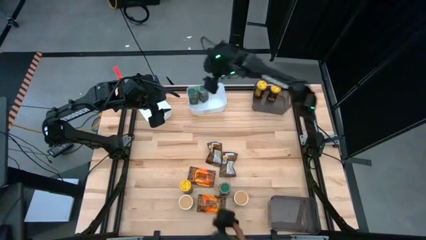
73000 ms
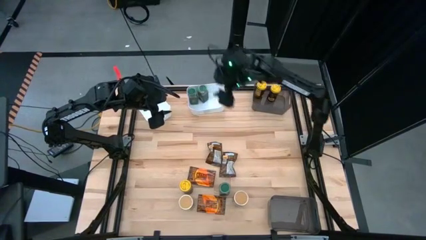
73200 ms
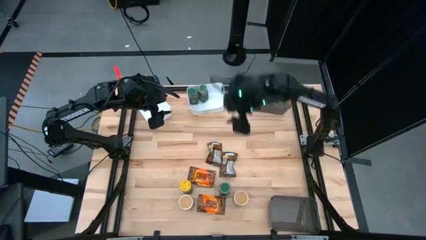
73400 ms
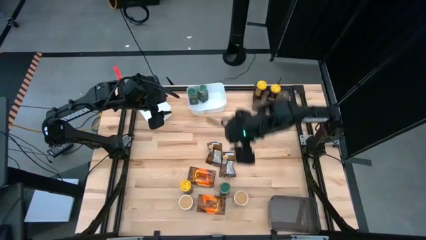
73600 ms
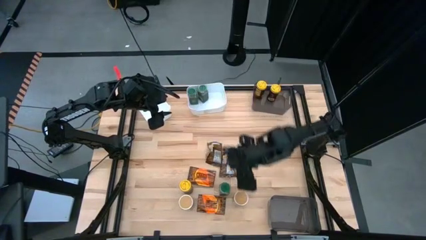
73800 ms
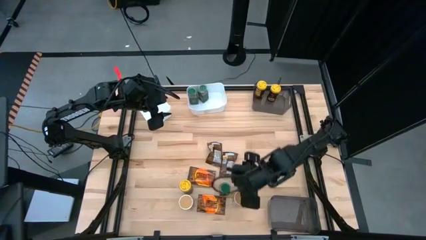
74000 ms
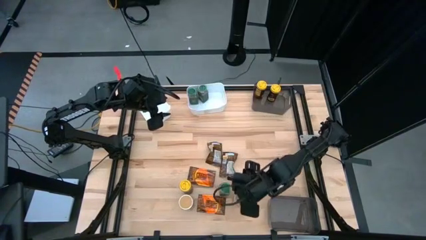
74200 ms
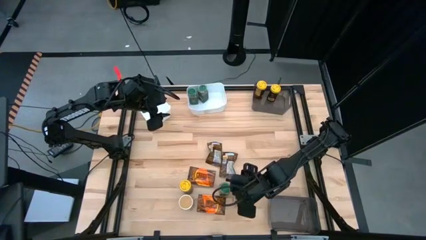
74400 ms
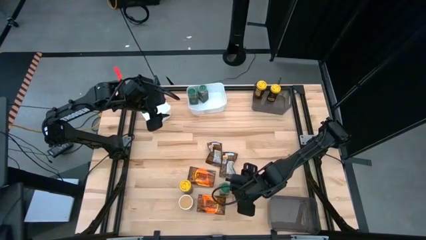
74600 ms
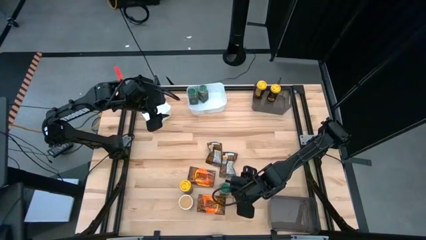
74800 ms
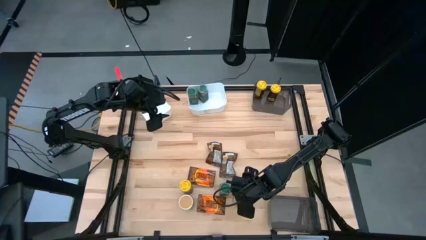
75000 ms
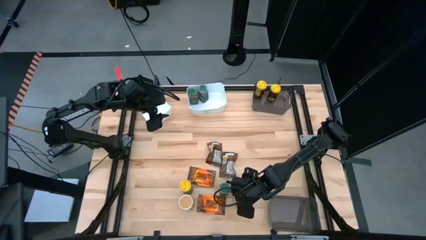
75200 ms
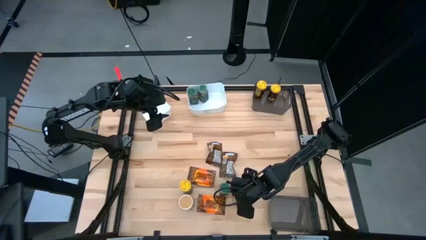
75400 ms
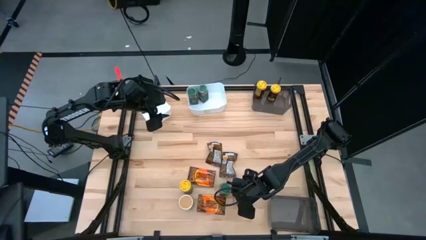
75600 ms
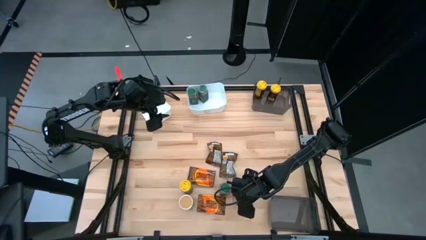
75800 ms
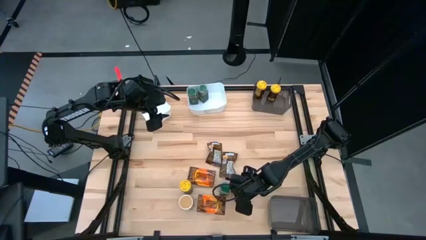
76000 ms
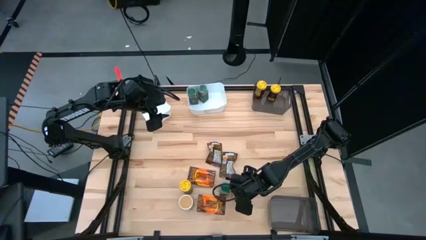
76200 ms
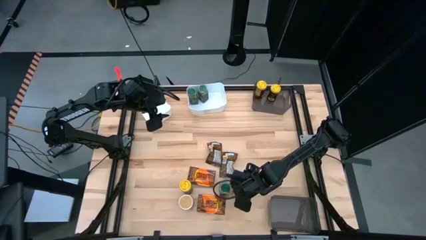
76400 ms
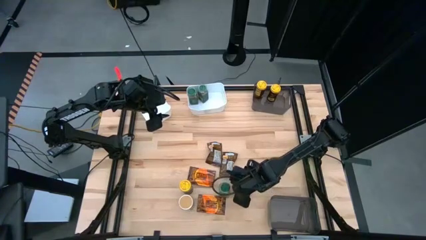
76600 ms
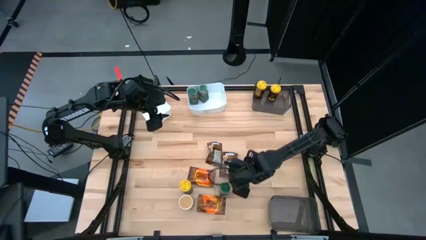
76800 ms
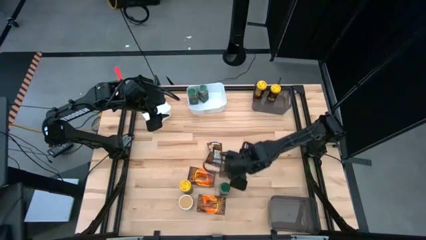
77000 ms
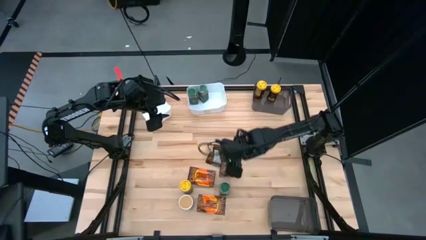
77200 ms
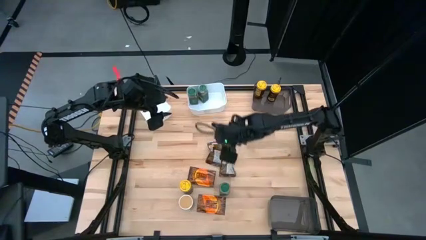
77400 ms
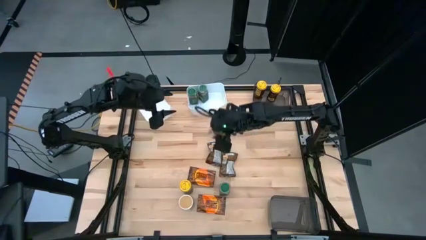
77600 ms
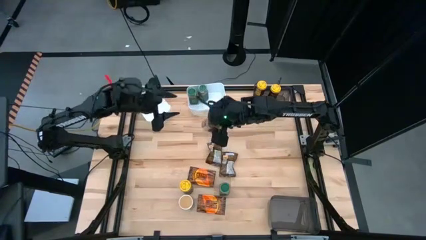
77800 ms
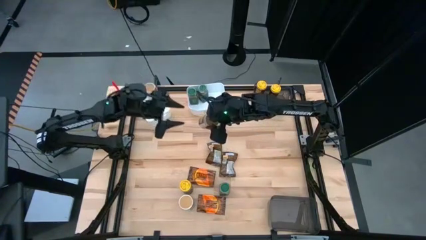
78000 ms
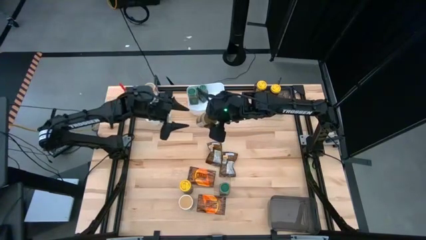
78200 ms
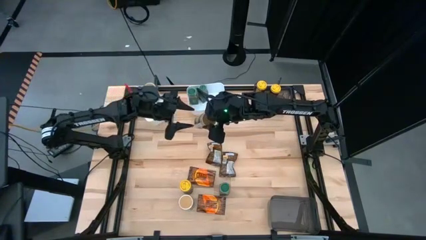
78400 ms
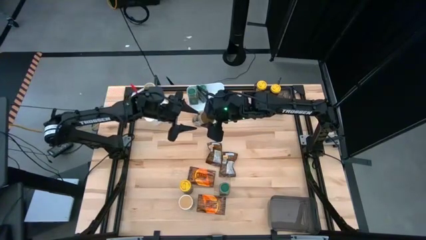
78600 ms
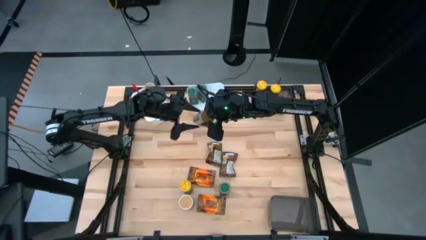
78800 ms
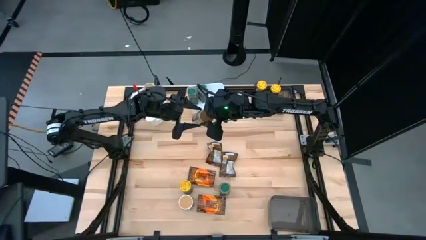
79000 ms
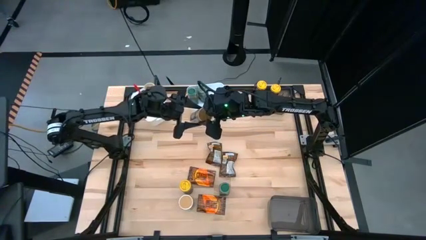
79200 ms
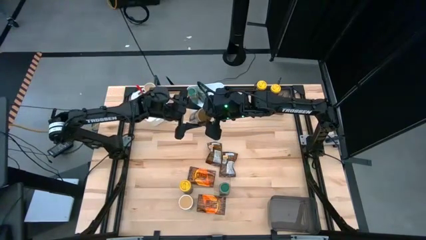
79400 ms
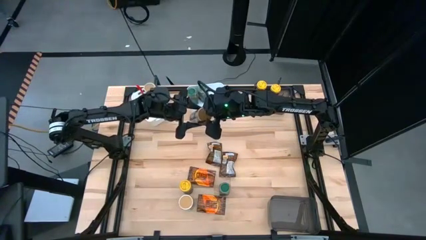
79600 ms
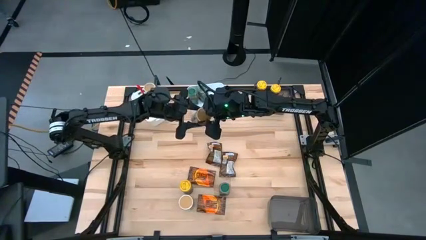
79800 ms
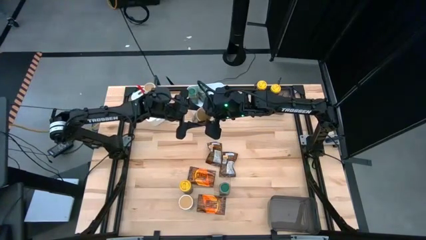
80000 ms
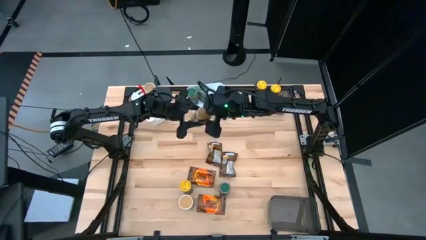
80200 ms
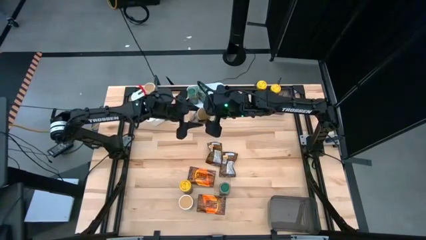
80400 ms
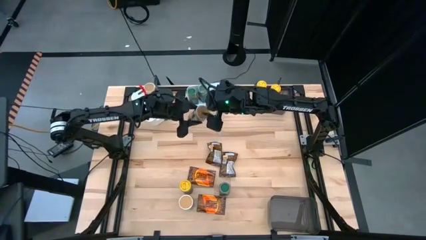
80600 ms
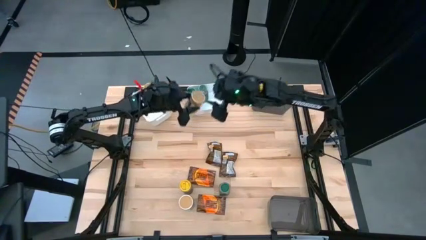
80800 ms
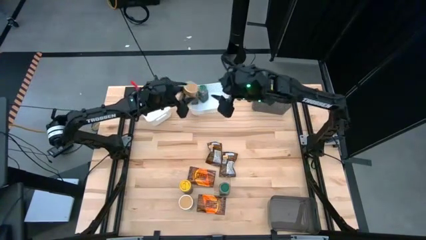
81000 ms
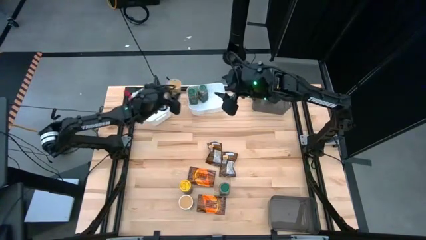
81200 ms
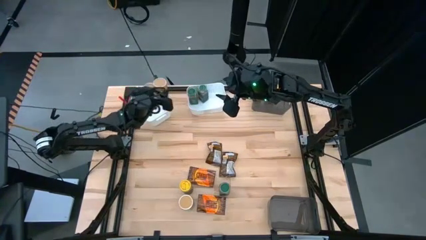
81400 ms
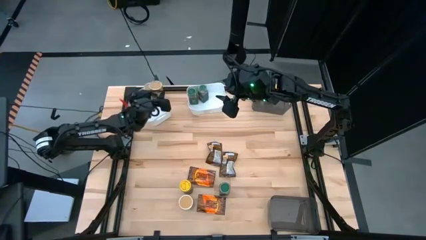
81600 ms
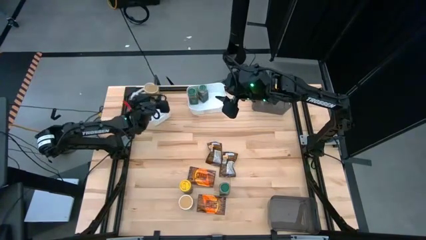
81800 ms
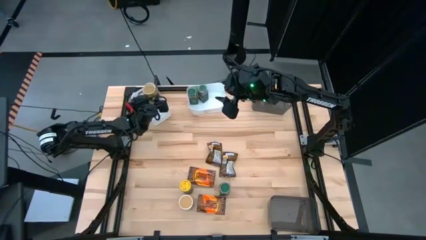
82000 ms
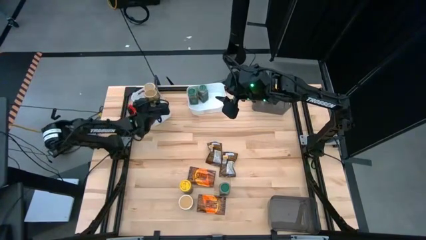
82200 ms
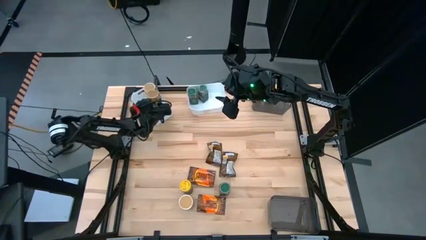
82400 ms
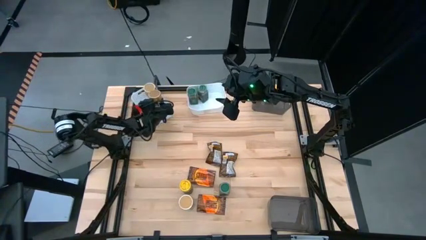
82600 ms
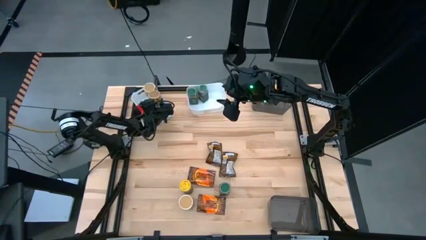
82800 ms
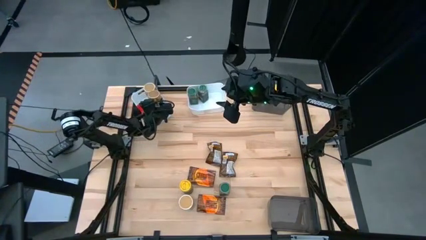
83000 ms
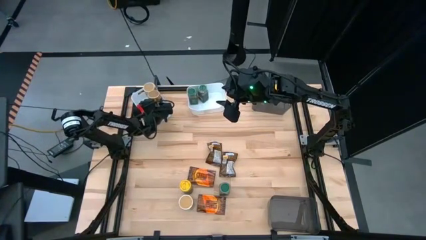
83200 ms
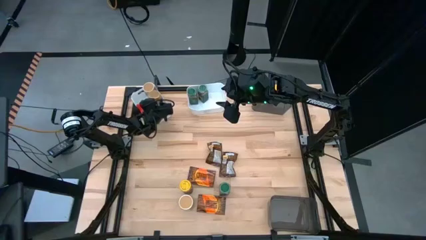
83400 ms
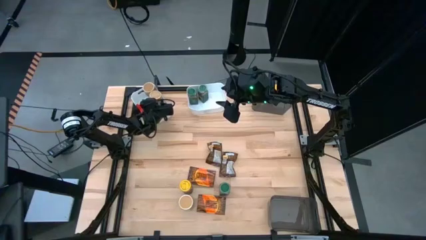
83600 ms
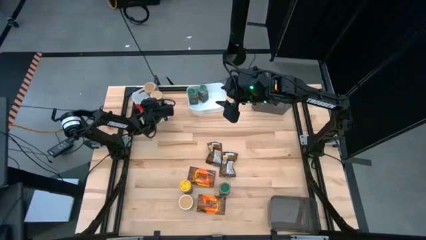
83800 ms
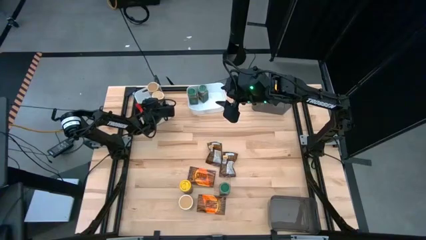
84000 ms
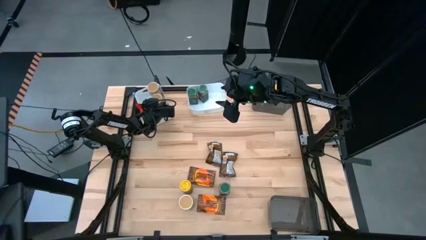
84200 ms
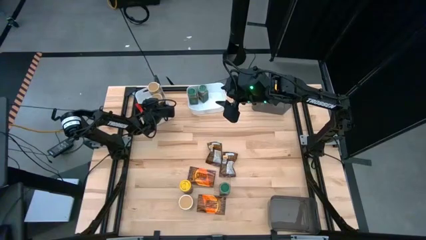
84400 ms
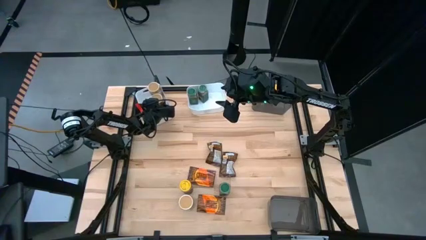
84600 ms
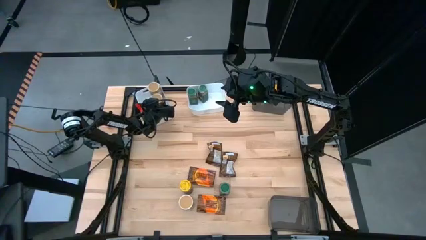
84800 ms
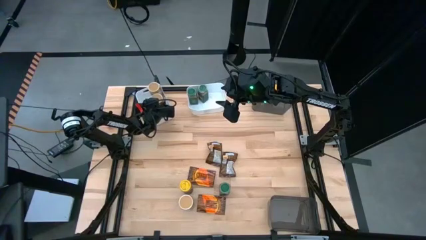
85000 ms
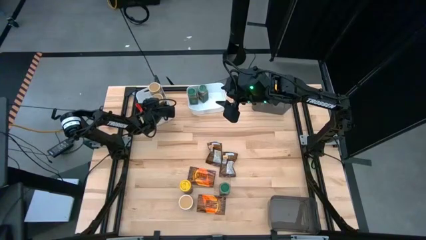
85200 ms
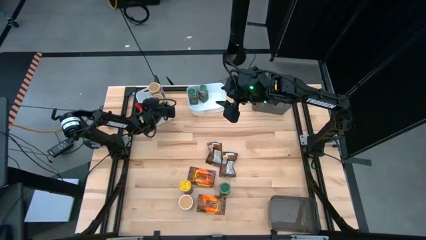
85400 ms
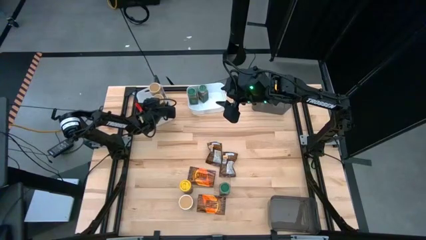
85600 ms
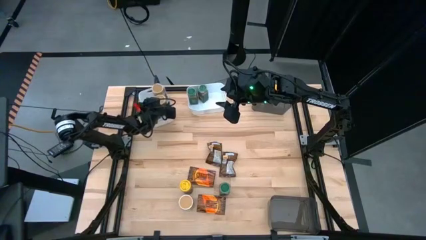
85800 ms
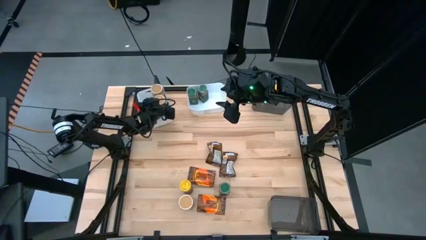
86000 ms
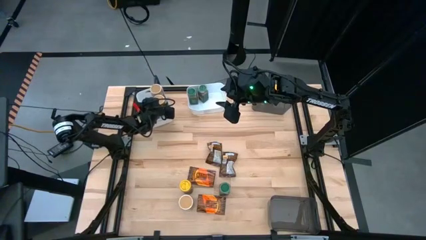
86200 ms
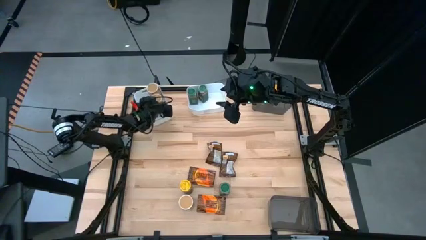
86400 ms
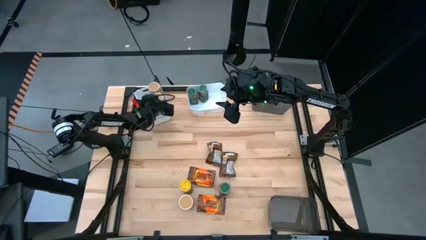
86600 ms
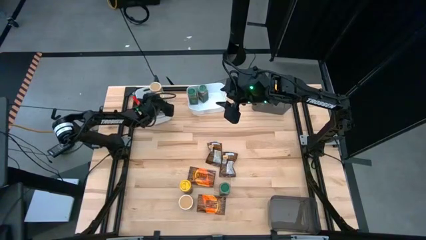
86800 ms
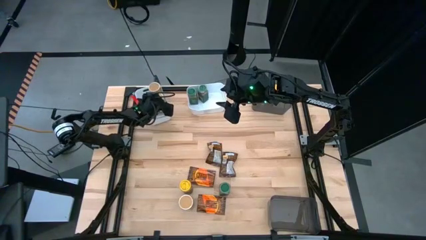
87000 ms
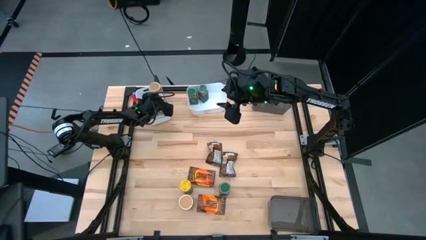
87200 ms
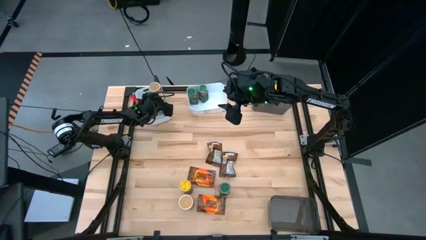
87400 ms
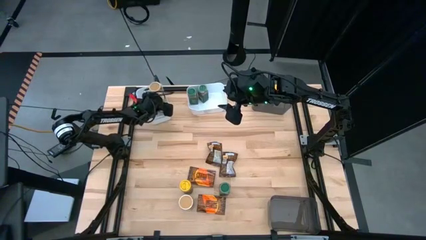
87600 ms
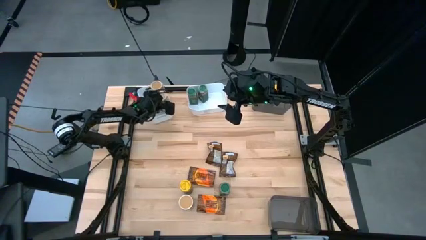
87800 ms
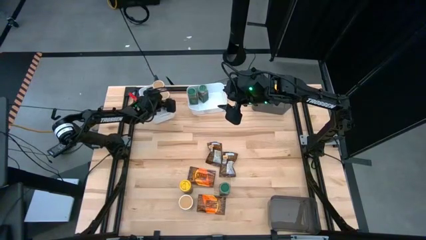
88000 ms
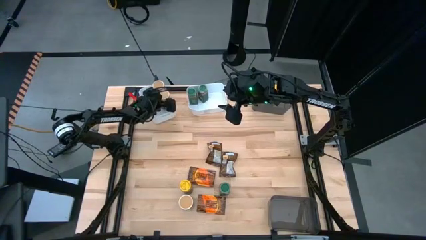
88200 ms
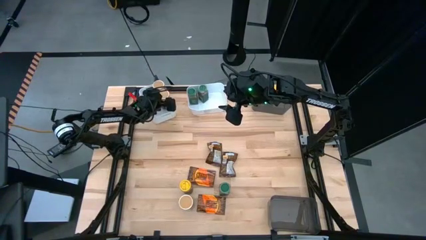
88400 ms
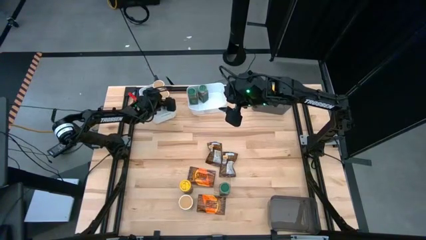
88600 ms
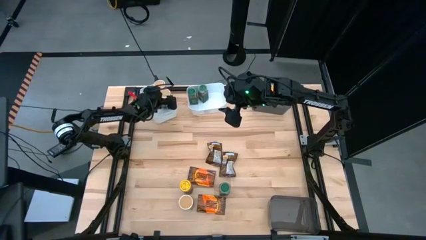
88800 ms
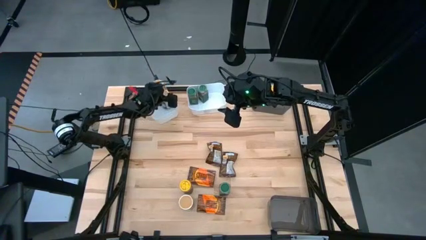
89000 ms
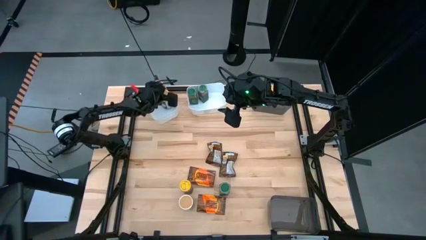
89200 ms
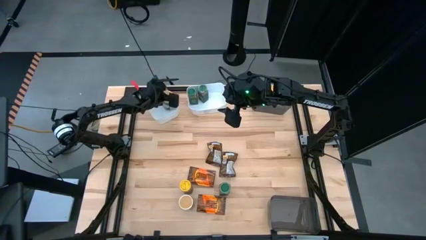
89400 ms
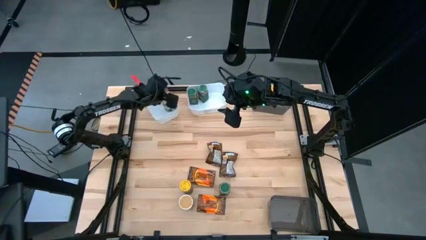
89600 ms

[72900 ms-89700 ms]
Task: Sort spices by type
Put the right gold seasoning bottle into the left white bin
